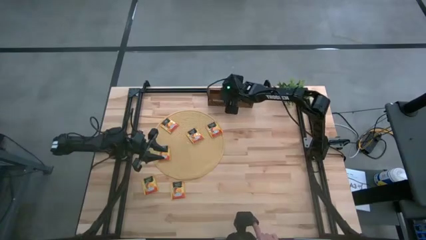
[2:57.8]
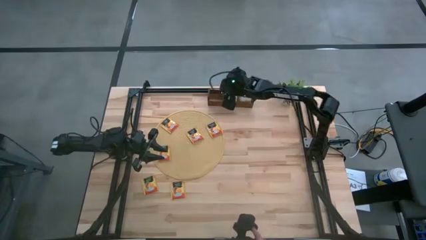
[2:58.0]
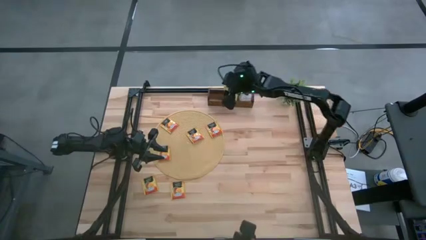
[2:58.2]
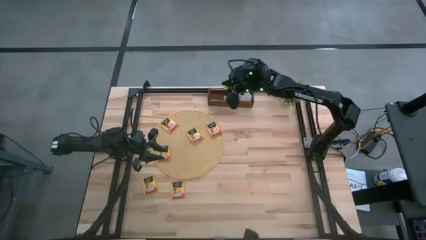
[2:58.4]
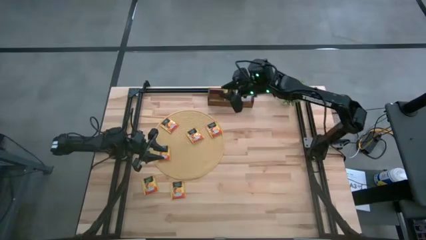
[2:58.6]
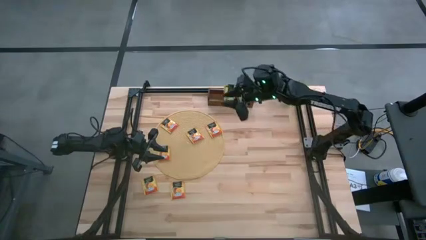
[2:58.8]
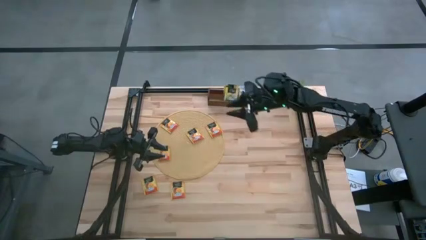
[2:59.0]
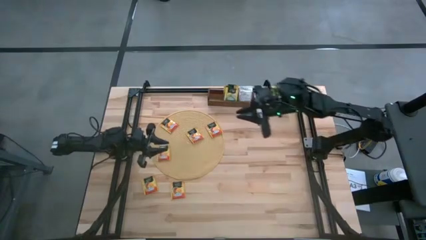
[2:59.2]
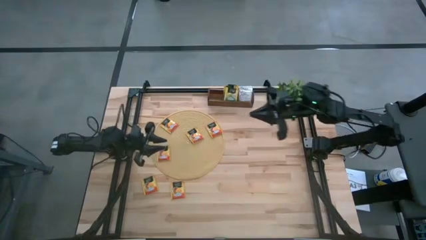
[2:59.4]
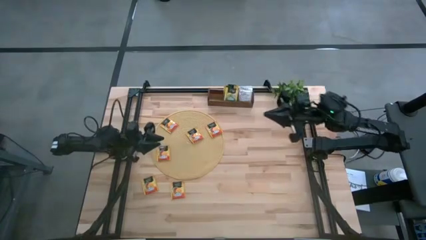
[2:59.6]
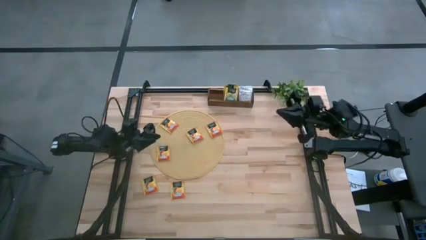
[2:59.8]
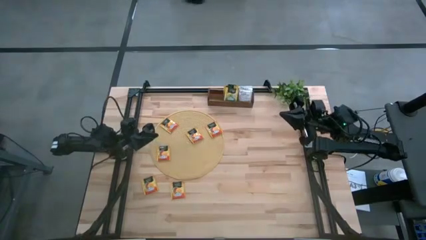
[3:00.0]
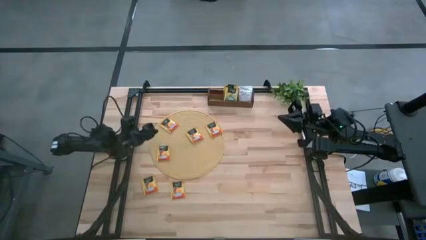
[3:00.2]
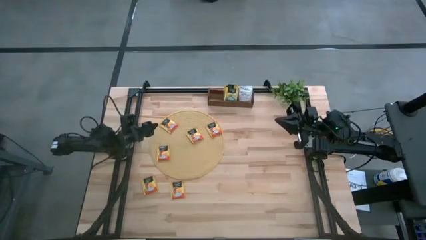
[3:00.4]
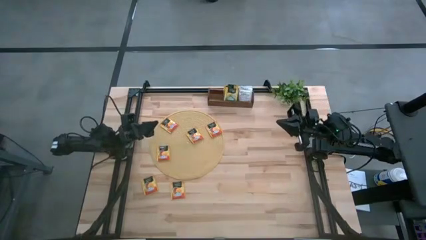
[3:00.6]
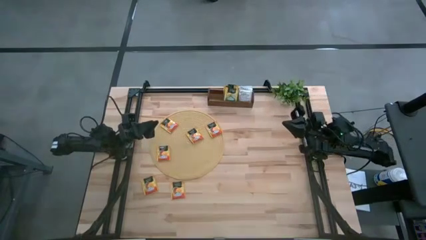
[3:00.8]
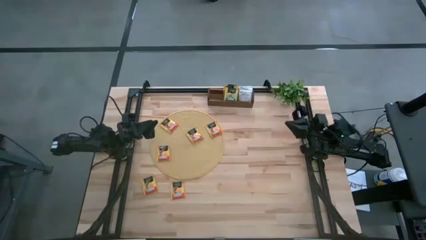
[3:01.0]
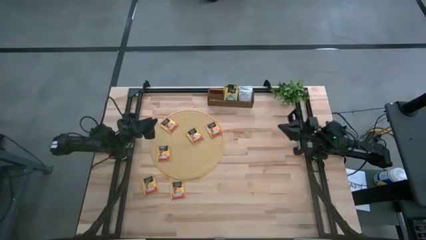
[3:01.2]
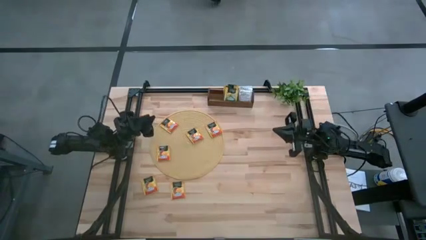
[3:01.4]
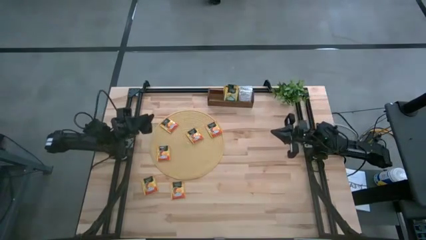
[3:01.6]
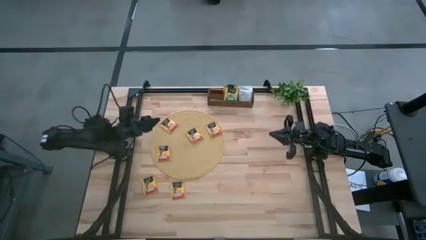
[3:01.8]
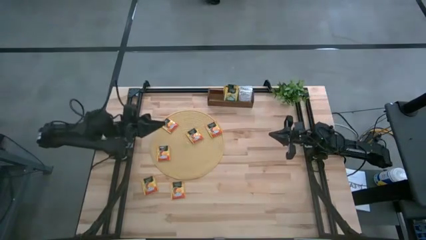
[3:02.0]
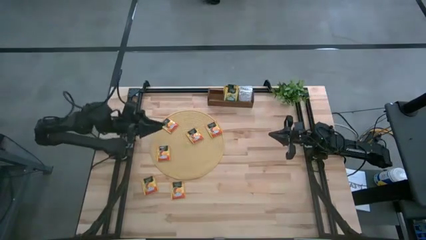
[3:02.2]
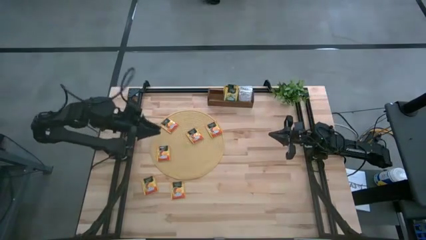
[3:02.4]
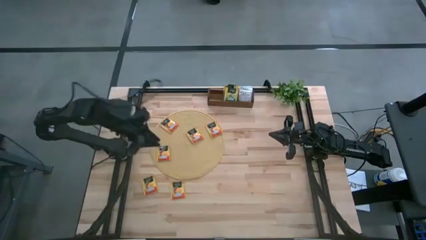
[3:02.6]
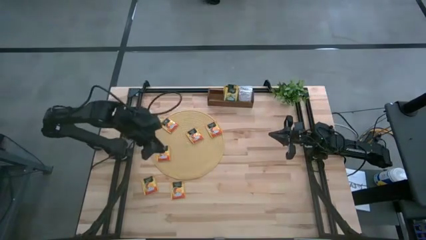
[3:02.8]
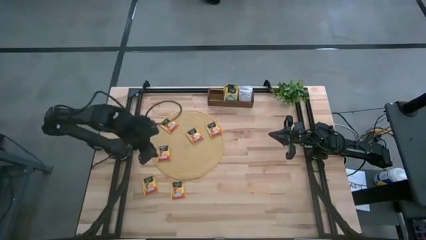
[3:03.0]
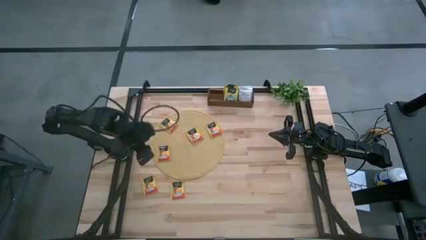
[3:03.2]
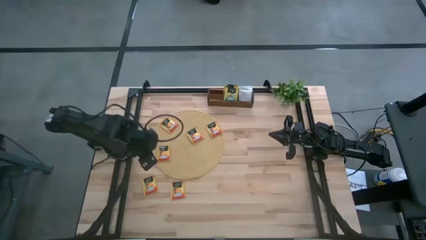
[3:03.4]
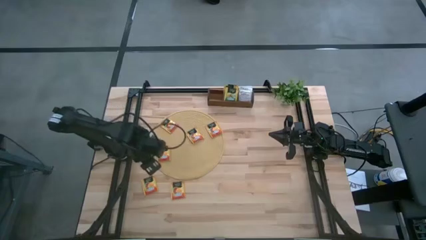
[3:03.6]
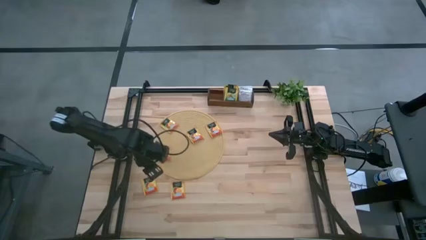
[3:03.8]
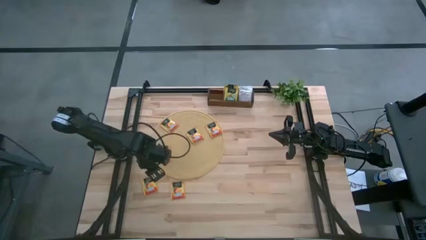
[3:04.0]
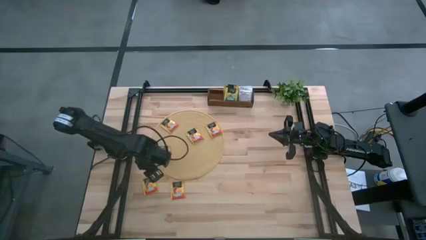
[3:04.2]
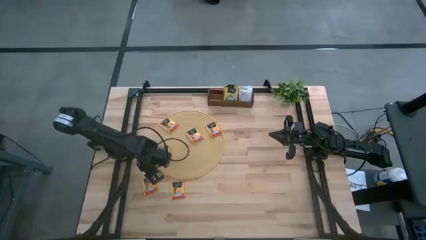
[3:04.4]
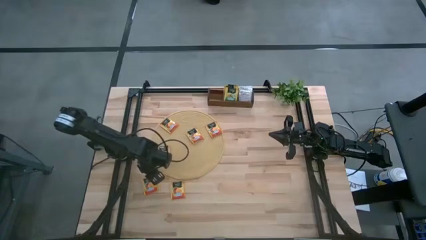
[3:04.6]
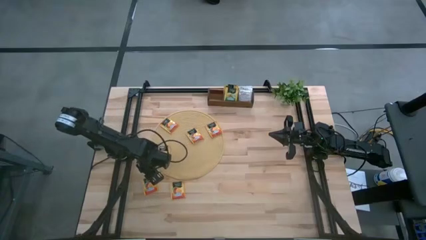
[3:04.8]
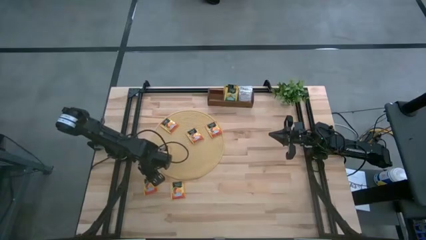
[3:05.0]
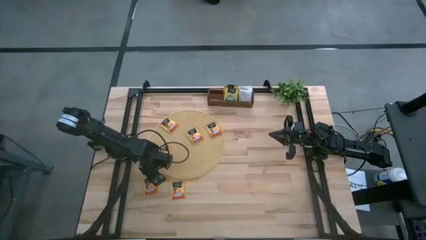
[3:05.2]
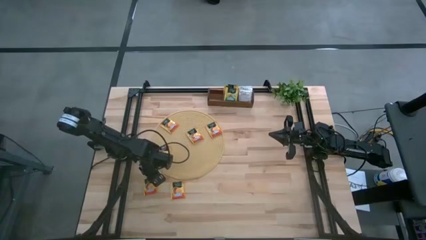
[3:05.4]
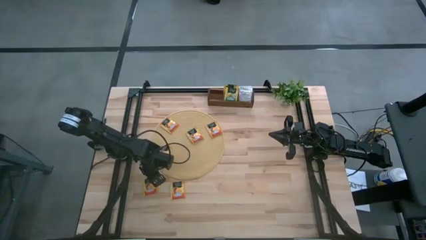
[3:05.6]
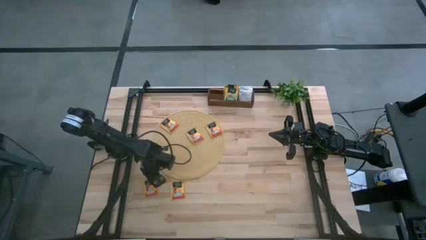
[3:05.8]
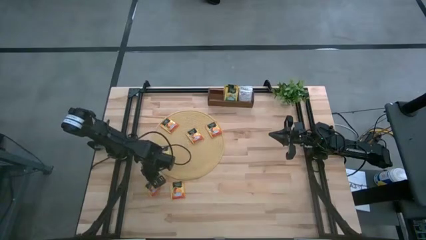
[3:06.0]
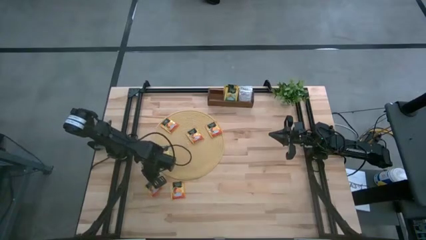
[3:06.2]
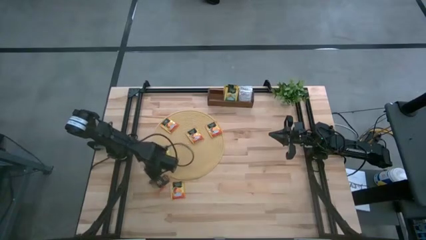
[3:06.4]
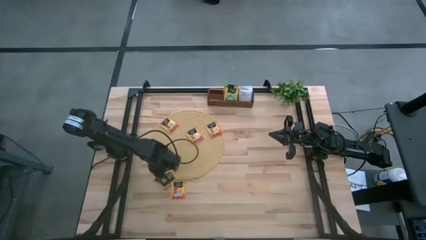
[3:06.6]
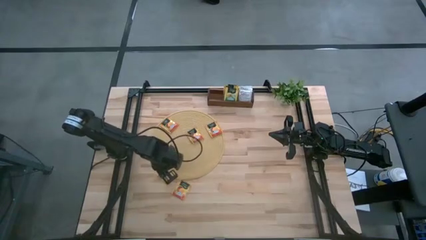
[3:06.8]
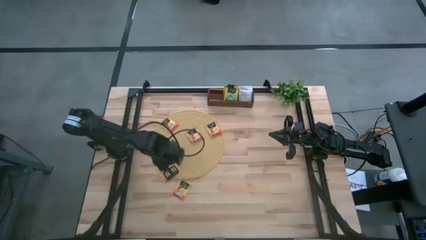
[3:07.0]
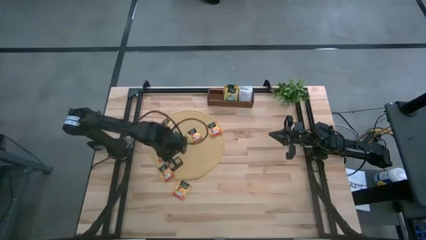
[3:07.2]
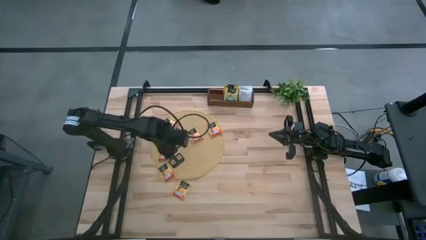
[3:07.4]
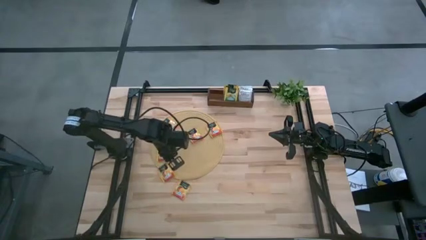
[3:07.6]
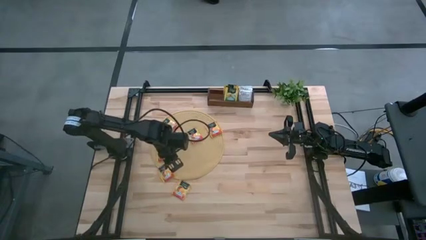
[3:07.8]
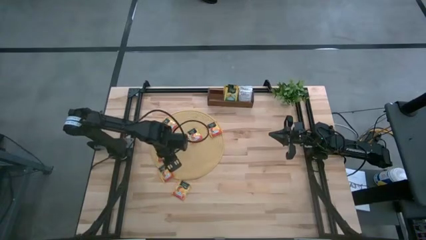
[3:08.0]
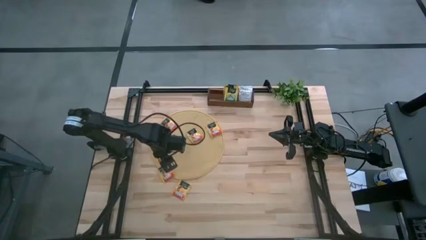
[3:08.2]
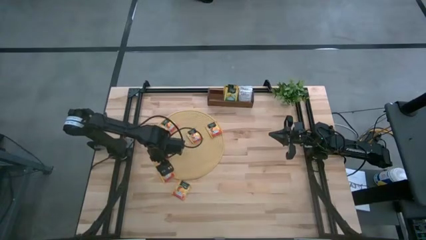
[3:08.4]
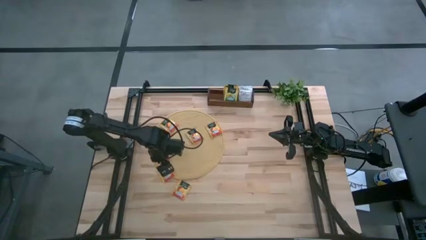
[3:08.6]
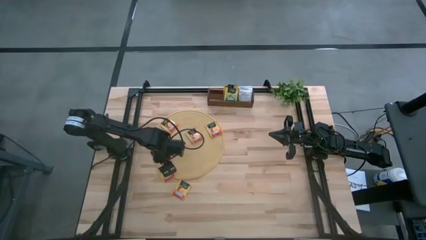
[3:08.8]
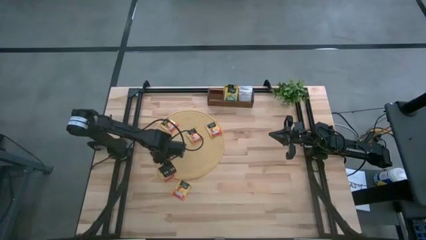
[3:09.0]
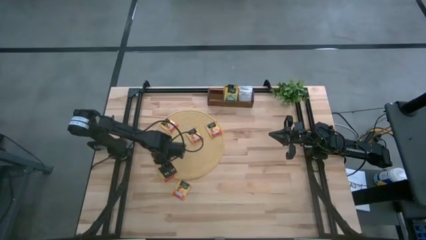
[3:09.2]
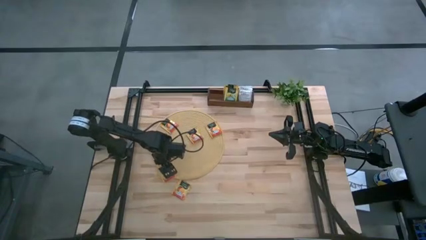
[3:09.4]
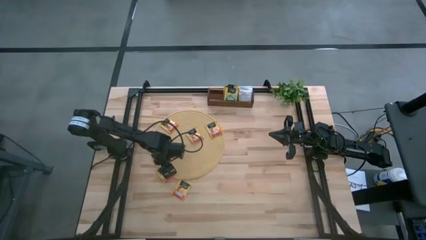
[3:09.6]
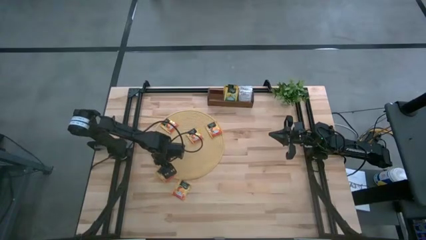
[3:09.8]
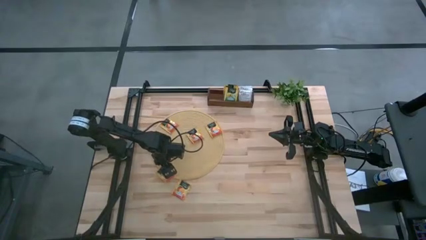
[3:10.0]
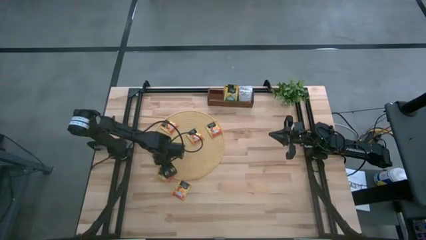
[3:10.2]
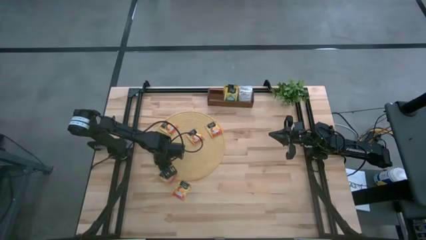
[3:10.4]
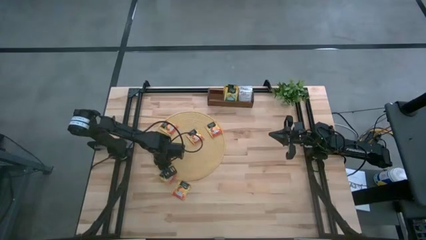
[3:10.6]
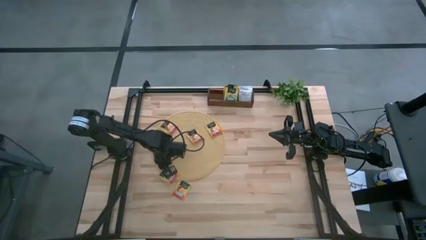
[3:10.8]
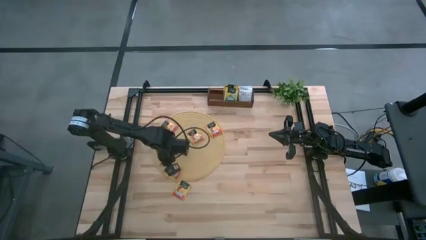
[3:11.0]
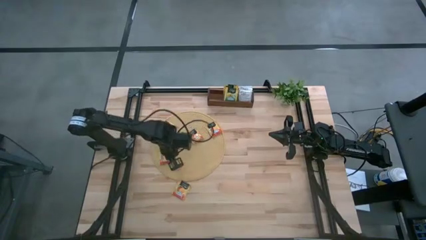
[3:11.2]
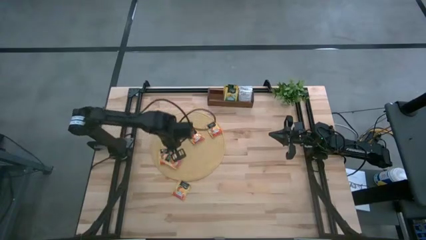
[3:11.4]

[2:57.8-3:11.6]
Task: Pick & Place Tea
Put the orange tea bag into the left section of the wooden organizer

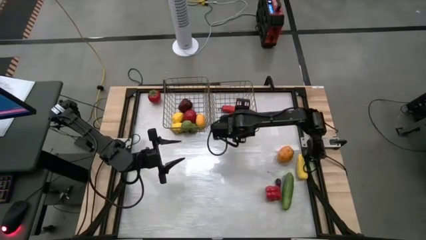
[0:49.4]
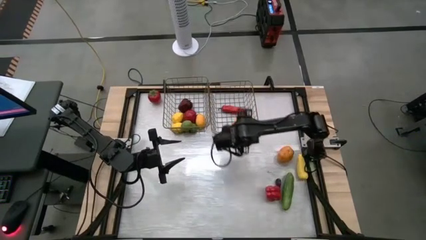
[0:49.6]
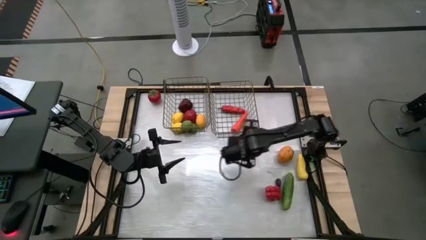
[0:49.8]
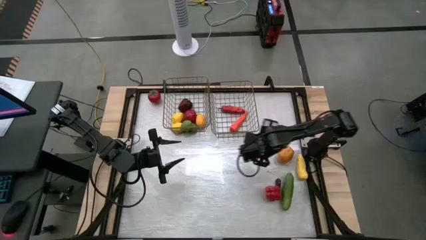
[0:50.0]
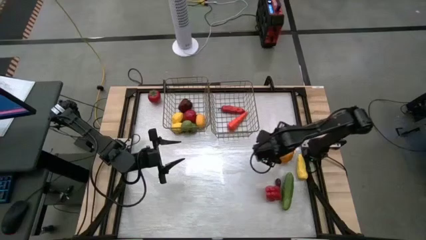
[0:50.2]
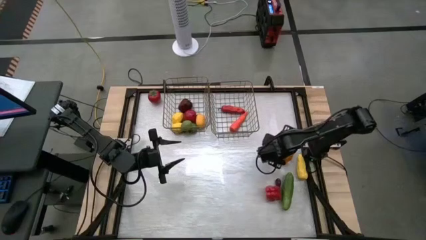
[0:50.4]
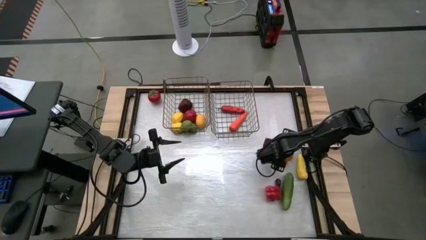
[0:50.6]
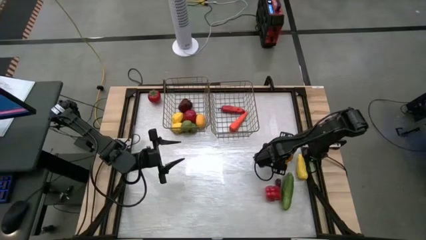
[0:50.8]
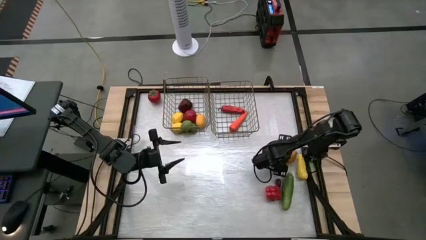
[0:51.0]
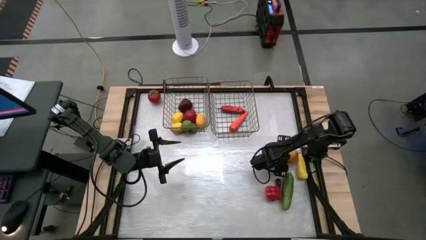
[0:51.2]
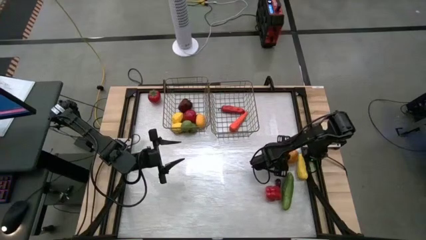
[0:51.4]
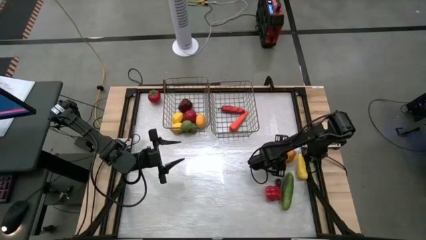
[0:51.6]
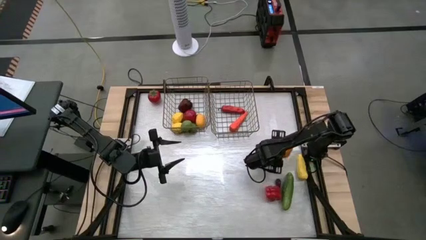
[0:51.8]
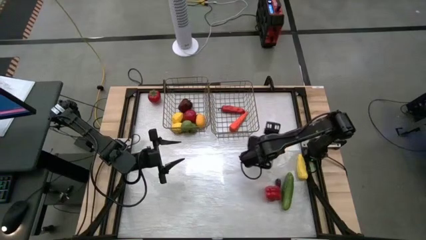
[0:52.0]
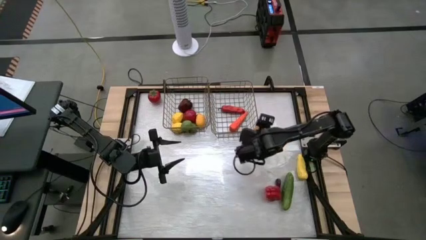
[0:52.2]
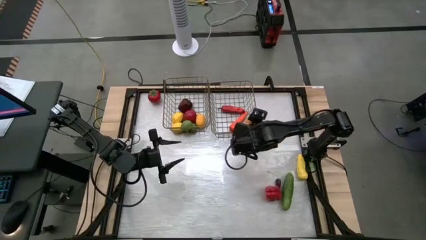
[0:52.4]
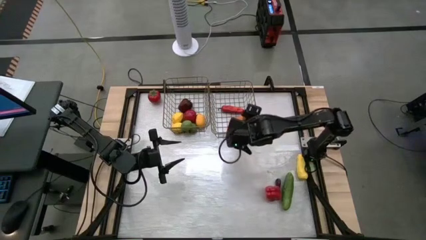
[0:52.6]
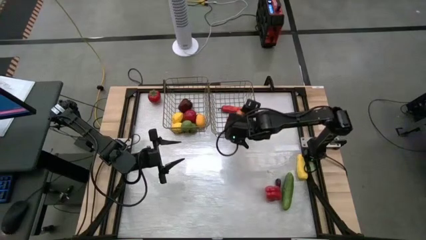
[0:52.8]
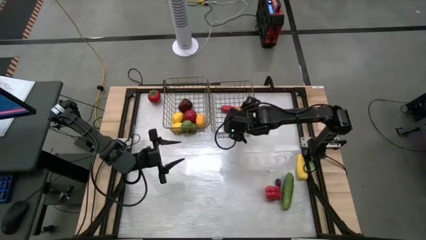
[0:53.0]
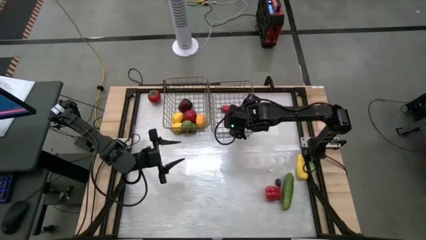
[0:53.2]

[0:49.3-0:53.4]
Task: Sort produce into baskets
Put the potato into the right wire basket
